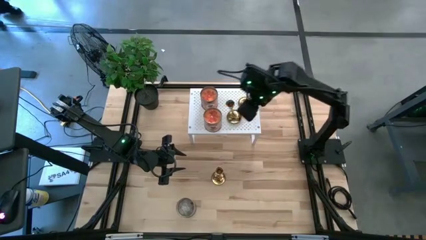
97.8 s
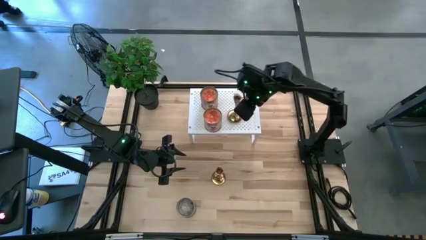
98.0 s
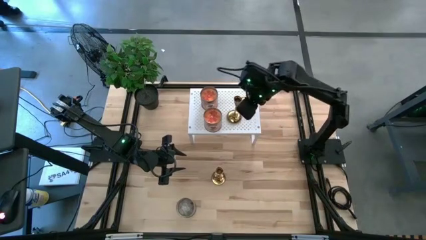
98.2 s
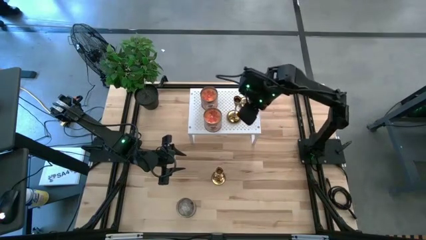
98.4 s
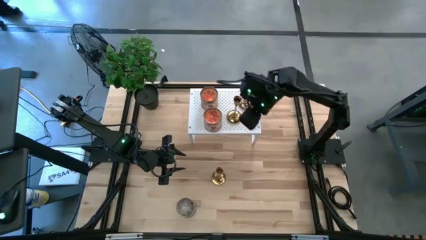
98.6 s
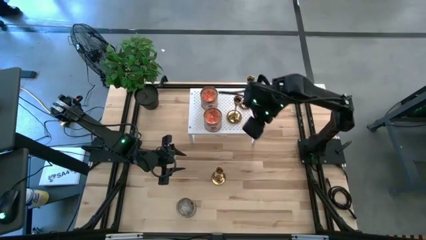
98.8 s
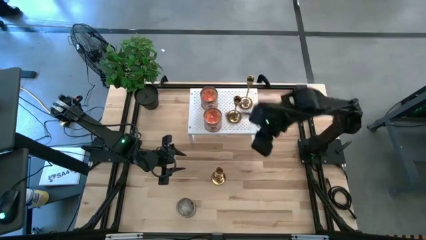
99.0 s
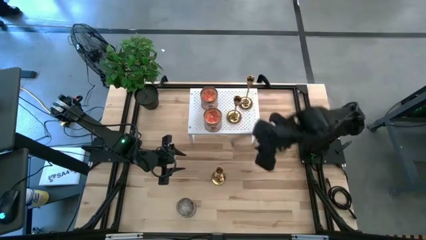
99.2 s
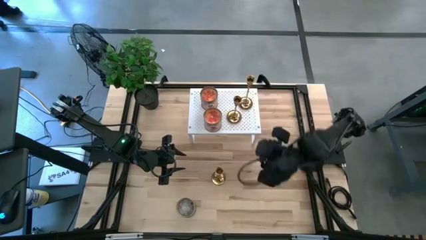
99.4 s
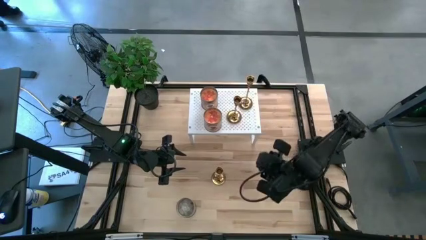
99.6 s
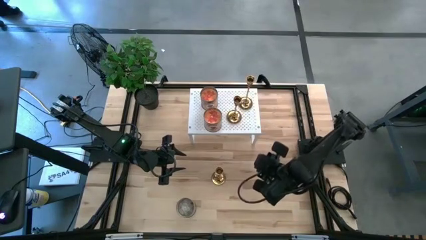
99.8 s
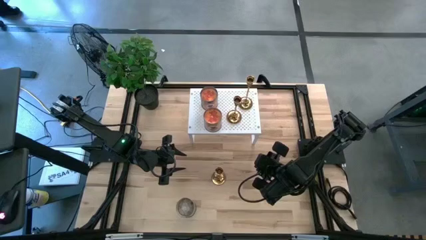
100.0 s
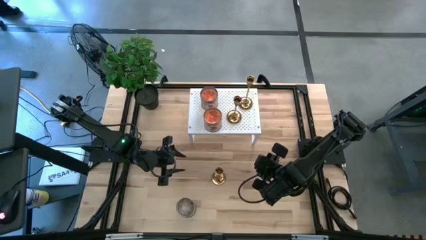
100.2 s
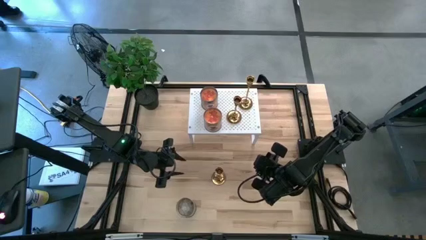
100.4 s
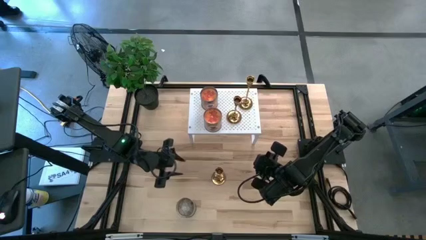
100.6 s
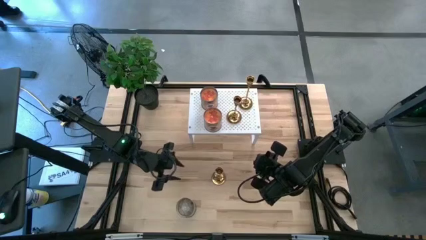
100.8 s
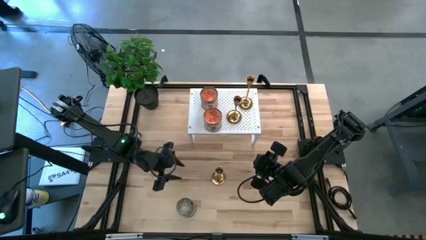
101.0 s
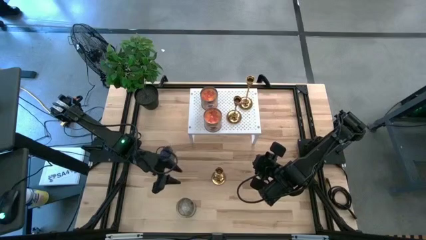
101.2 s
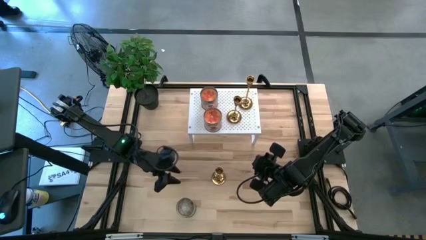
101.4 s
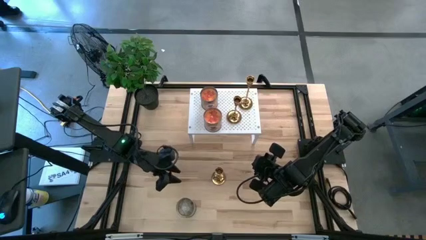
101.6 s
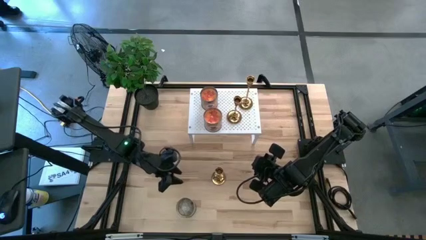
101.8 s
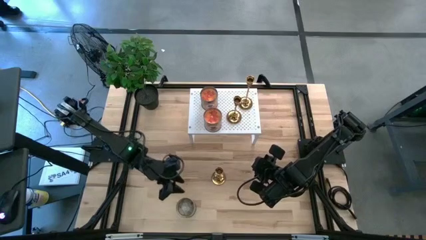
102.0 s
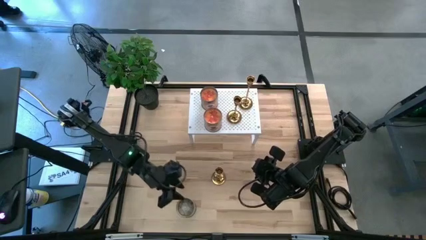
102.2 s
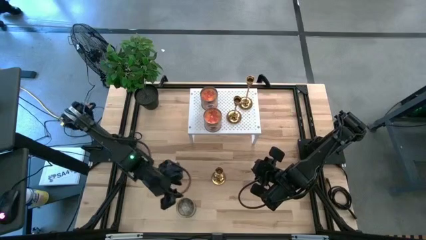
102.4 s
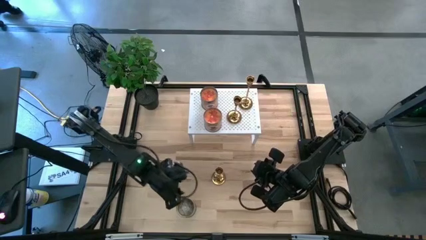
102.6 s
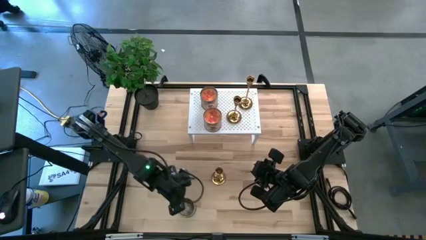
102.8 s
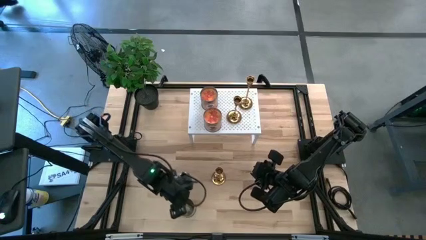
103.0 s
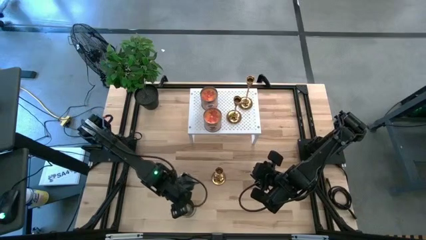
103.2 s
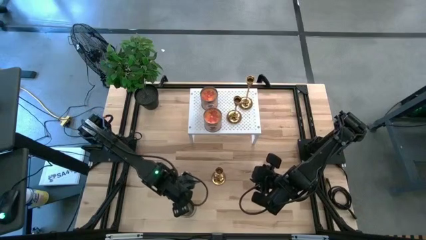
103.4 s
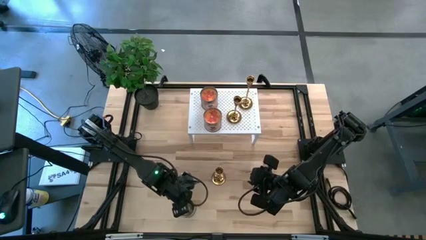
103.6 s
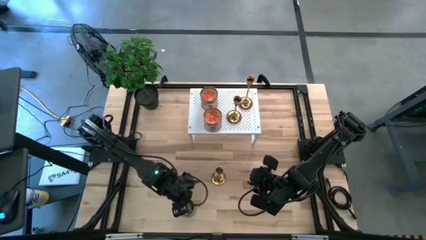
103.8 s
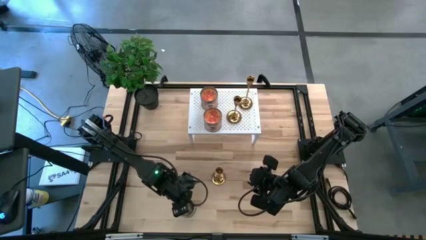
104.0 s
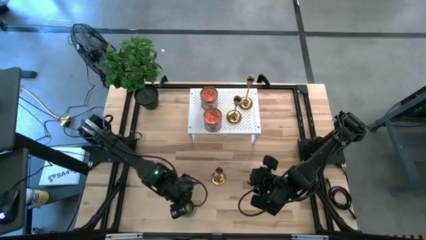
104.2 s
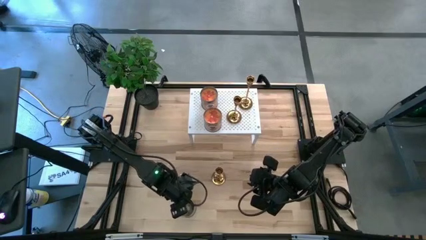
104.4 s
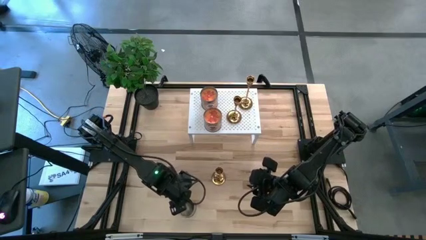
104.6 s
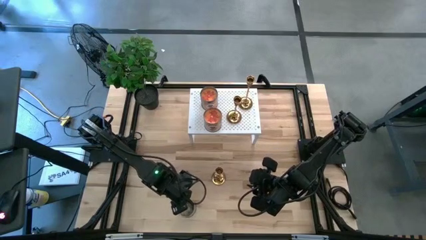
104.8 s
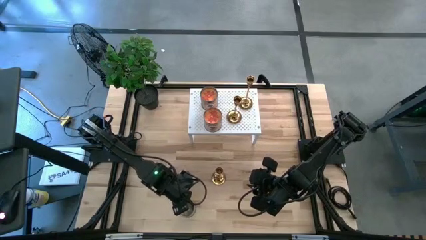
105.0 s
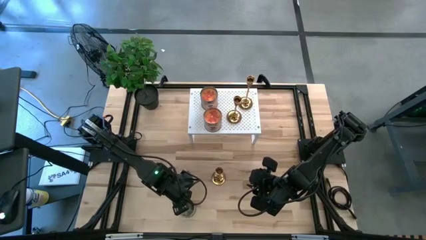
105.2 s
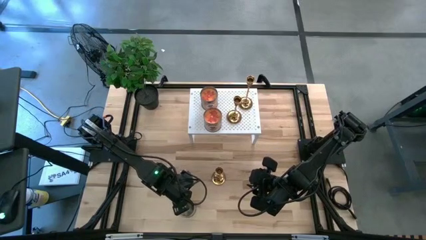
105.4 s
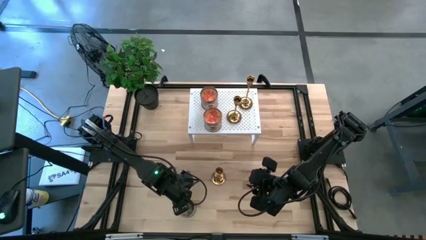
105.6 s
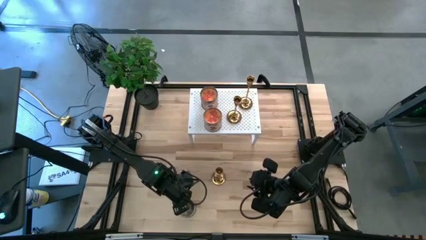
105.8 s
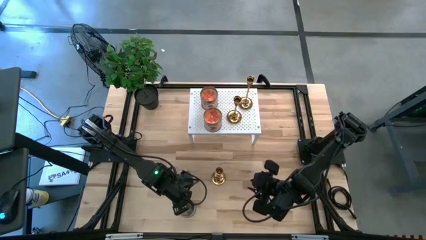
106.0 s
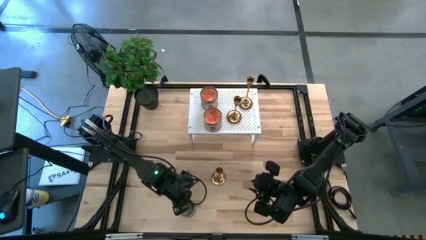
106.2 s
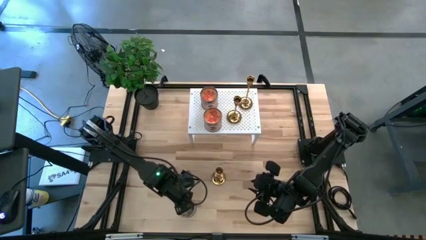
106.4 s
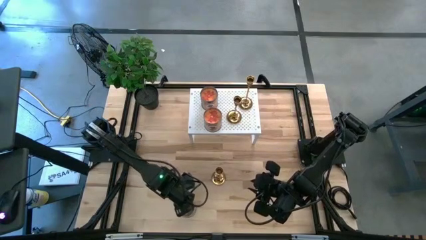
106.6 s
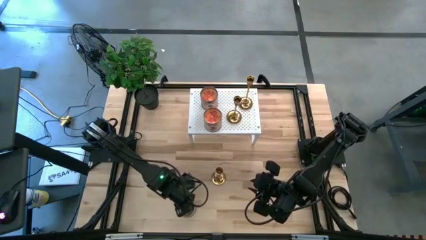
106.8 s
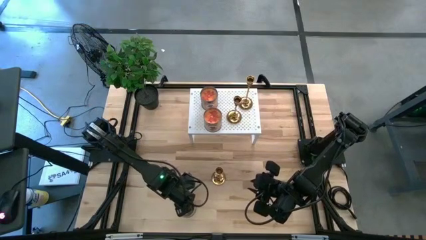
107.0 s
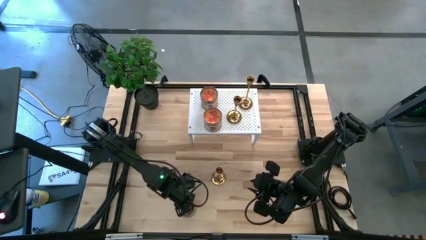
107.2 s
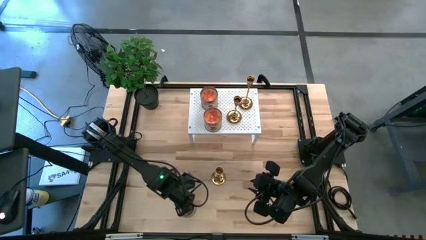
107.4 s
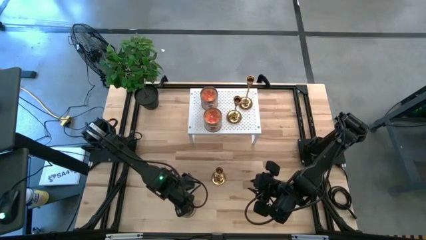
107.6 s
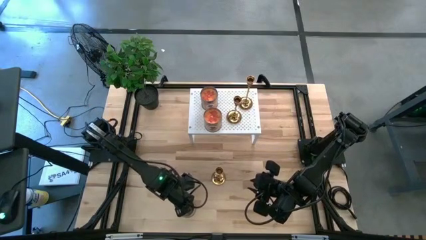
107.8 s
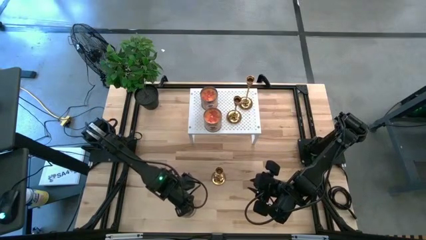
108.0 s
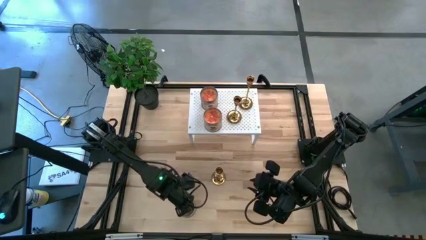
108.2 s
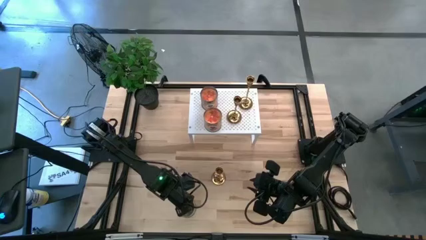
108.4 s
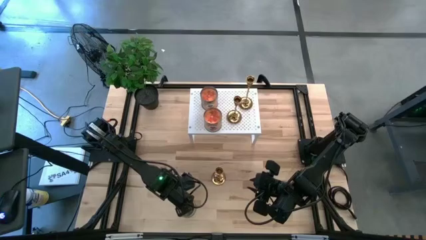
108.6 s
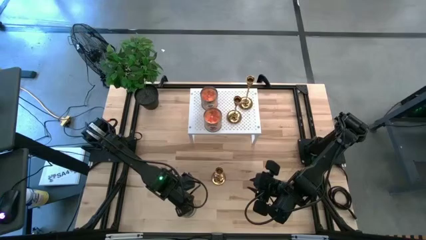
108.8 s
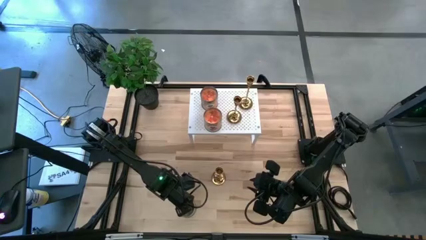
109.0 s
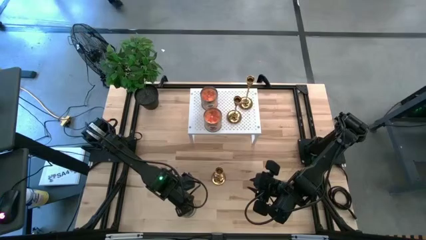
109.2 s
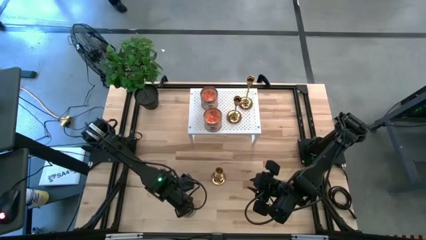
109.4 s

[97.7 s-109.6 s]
Task: Pick & Place candle stick holders
Put the brown scented candle on the shelf
